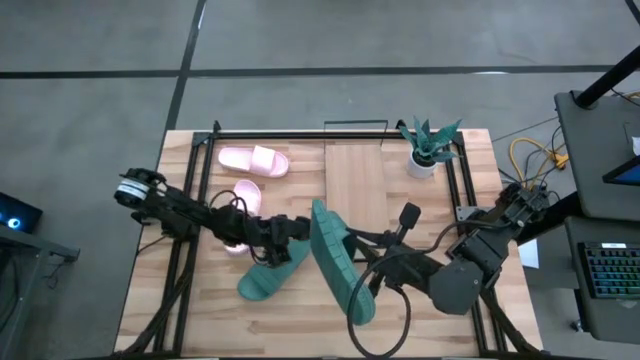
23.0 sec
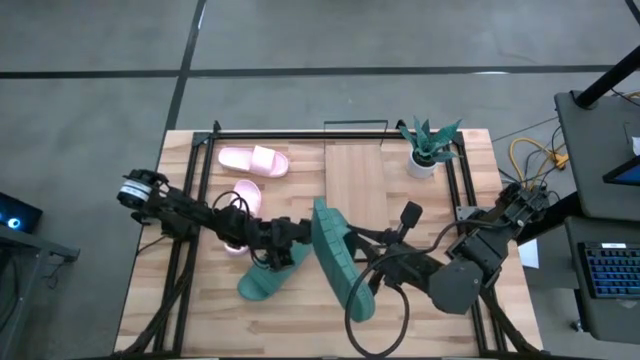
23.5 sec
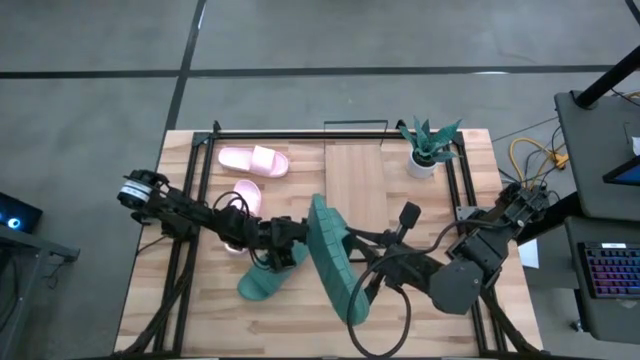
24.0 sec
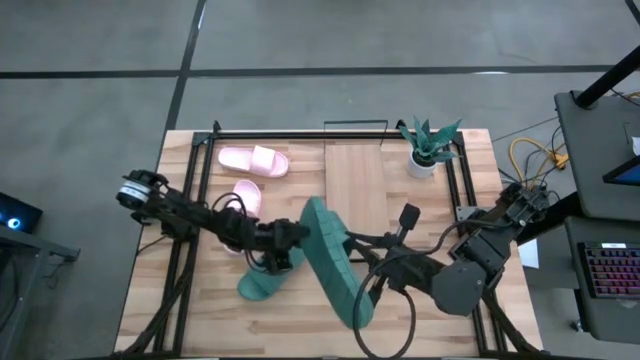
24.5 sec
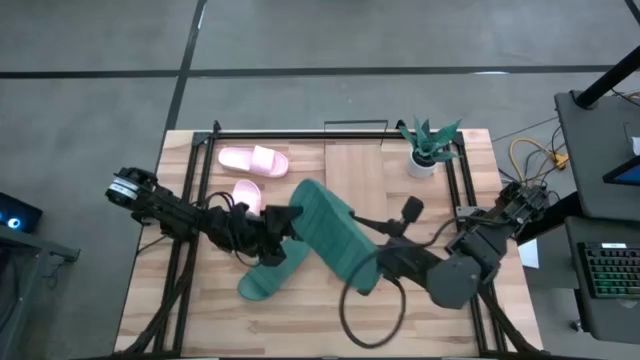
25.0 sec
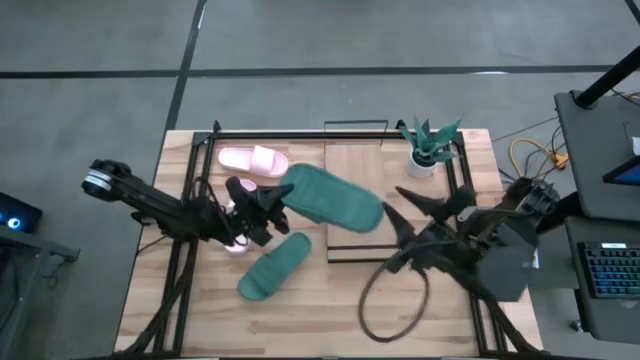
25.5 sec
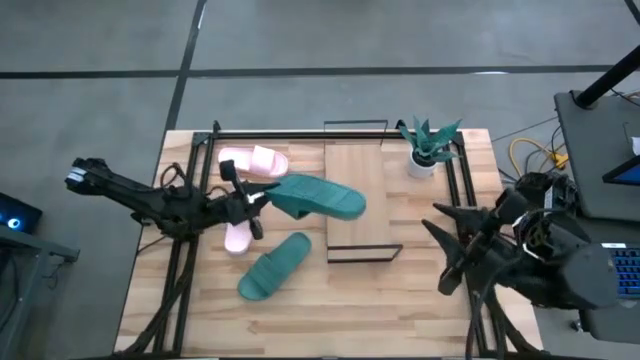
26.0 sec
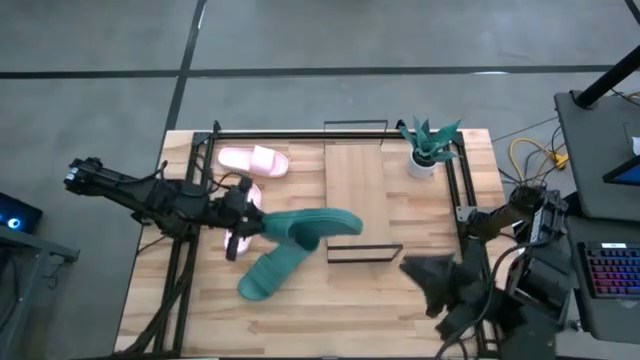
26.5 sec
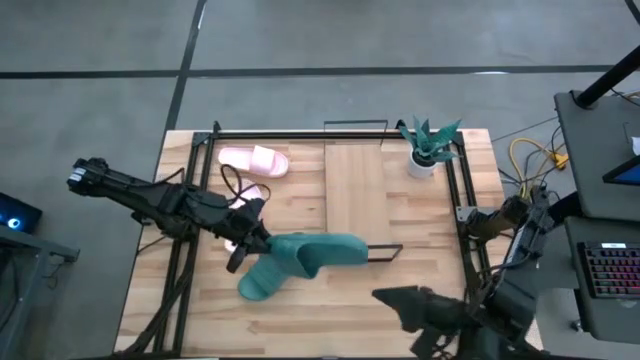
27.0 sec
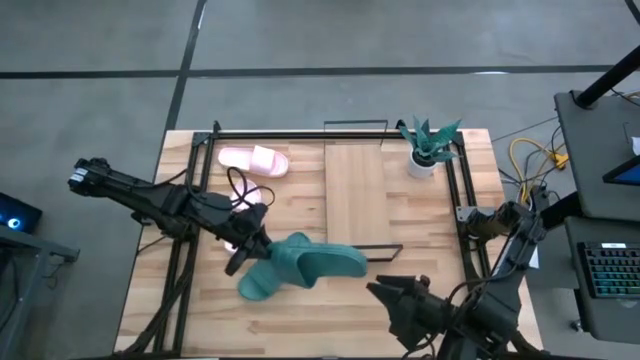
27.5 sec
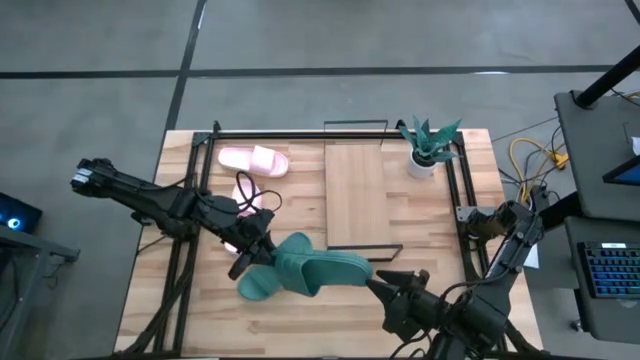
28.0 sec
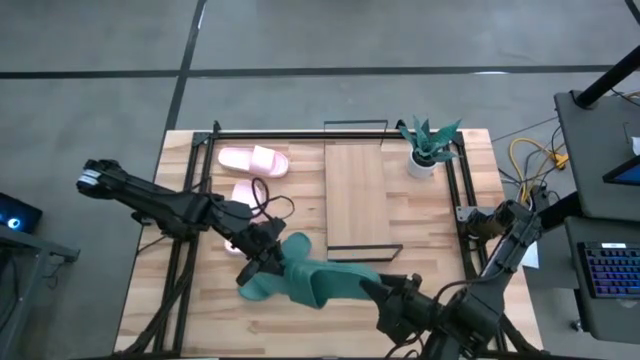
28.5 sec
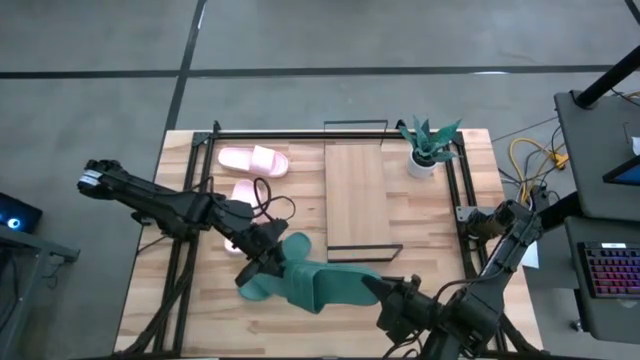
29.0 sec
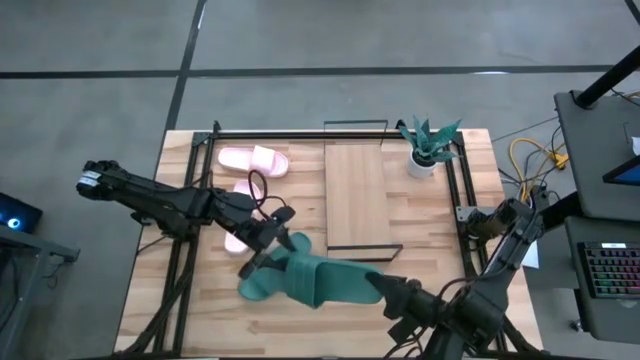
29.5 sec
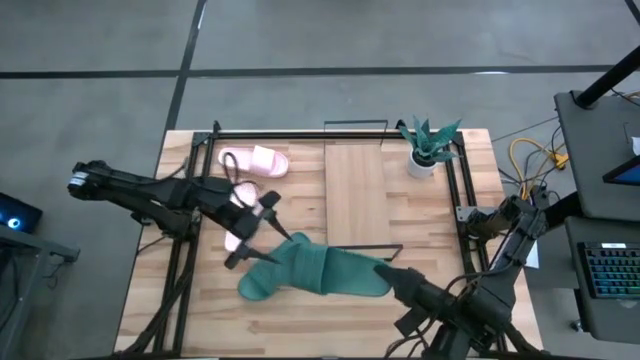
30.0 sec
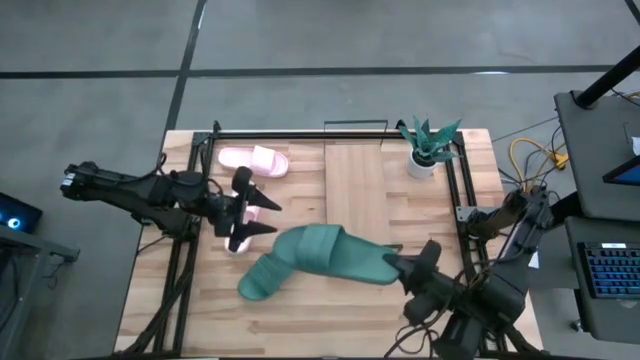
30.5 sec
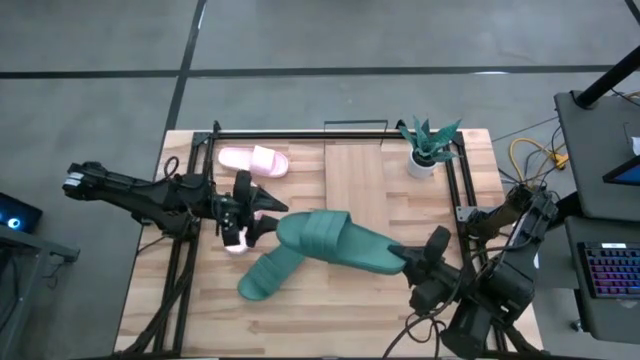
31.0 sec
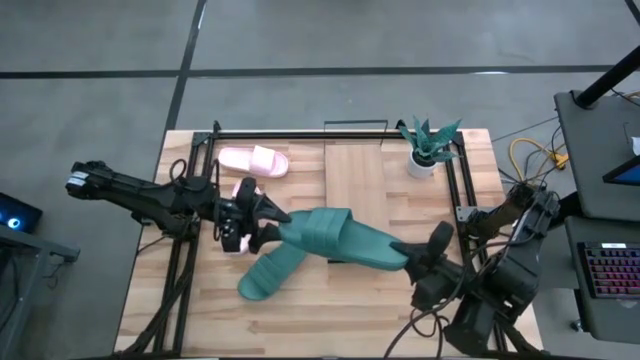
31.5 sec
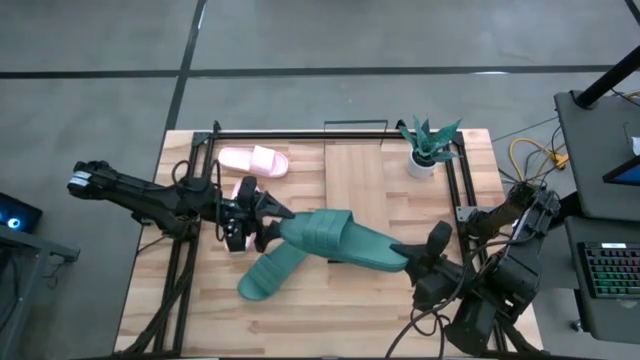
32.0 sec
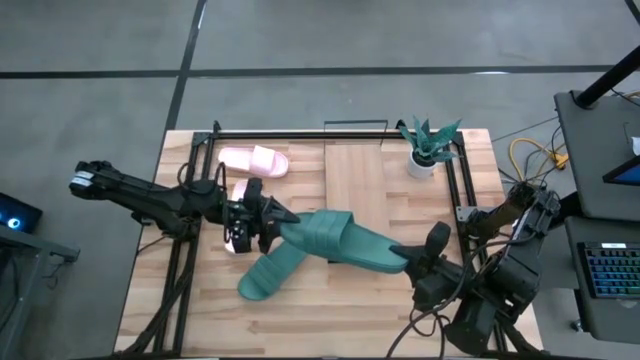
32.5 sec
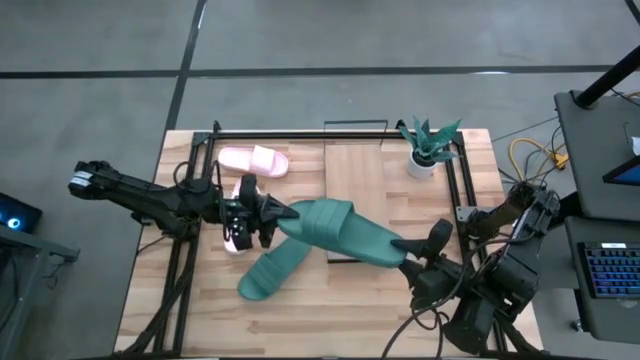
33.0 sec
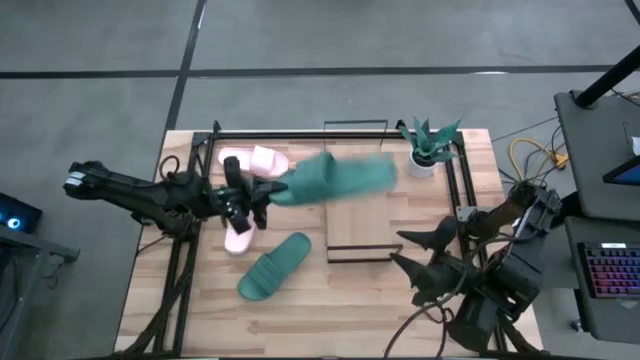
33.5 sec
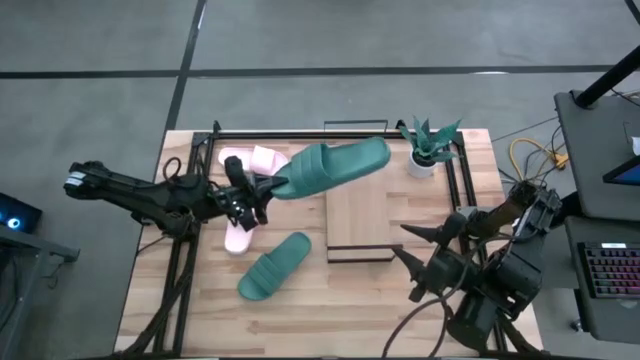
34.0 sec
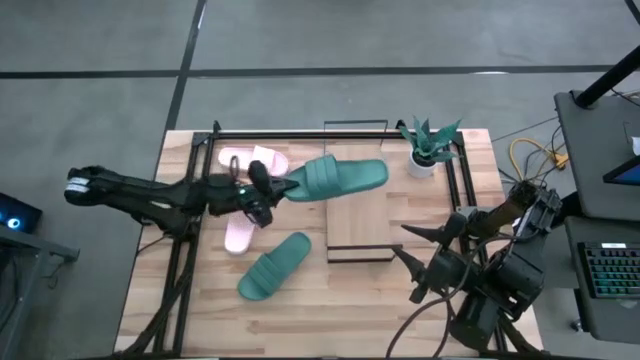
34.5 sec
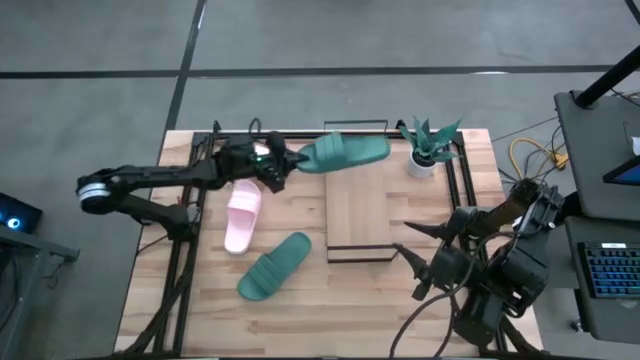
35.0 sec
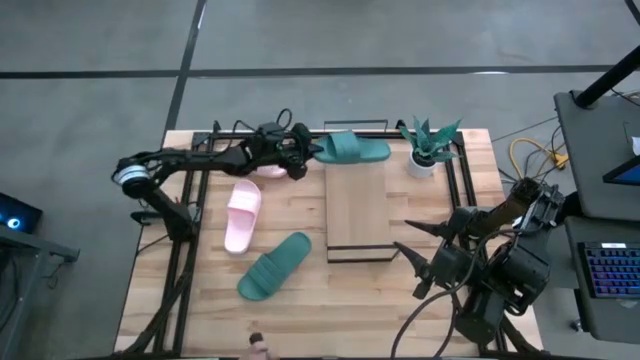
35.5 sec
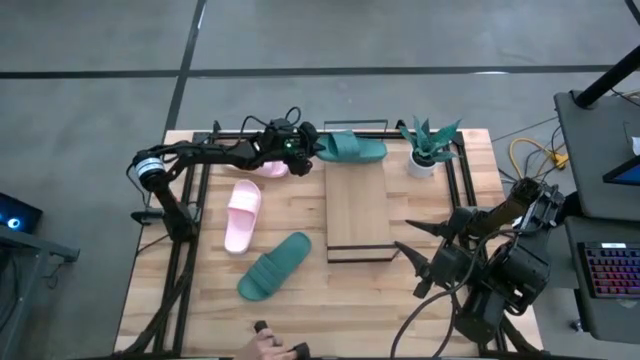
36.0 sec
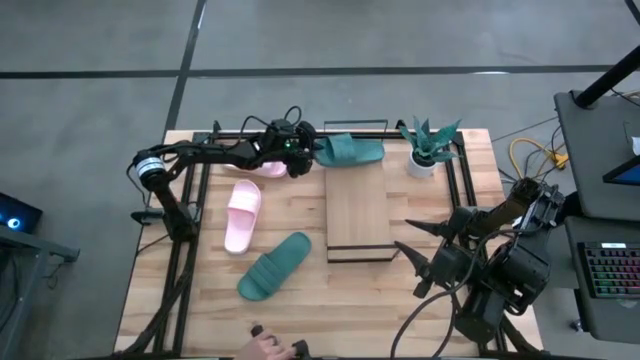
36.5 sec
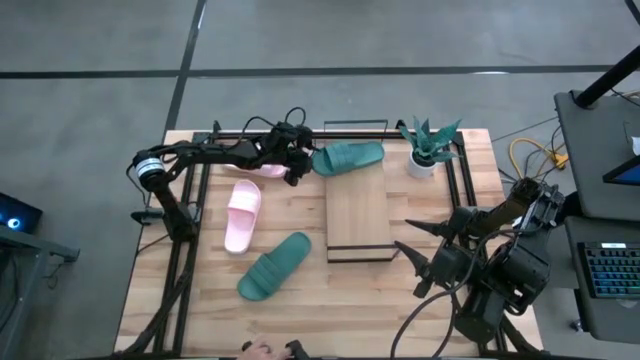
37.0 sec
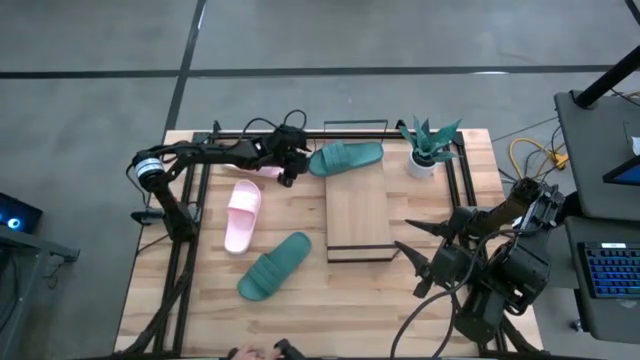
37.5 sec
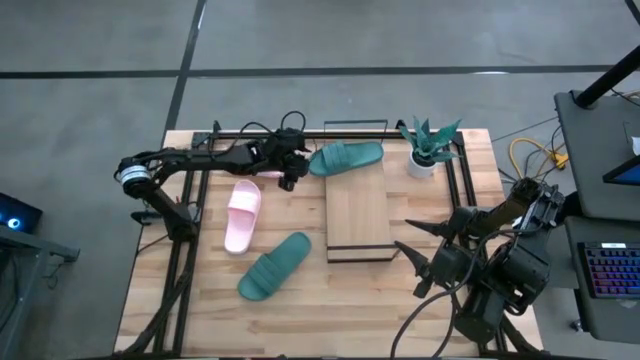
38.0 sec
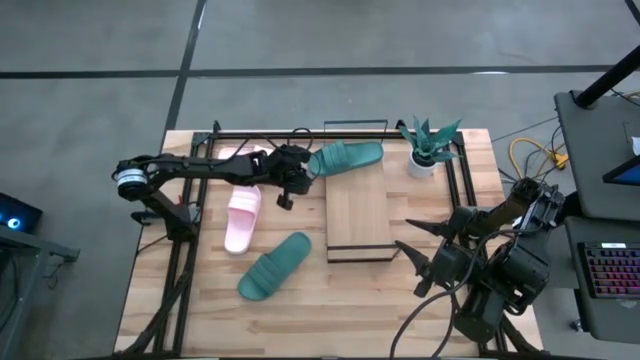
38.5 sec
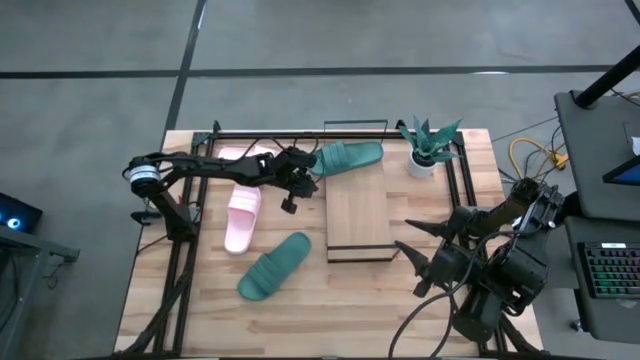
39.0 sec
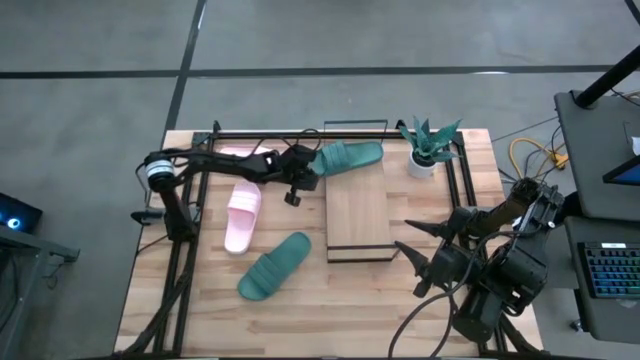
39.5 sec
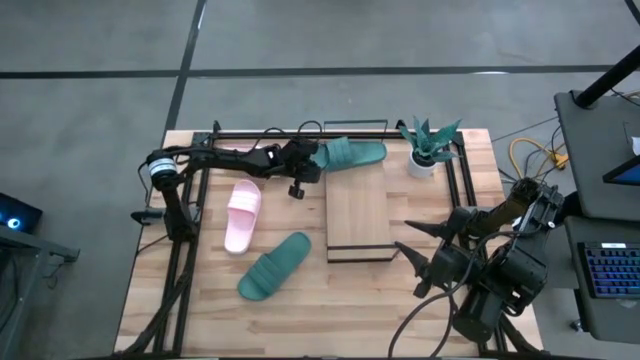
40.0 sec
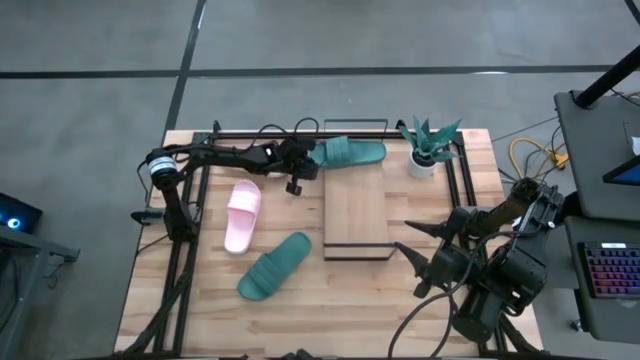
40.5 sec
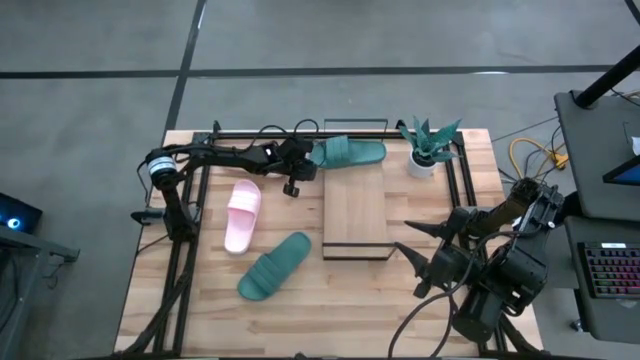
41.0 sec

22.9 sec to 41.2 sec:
Task: Pick and place slides into the shelf
Put the right green slipper on the shelf

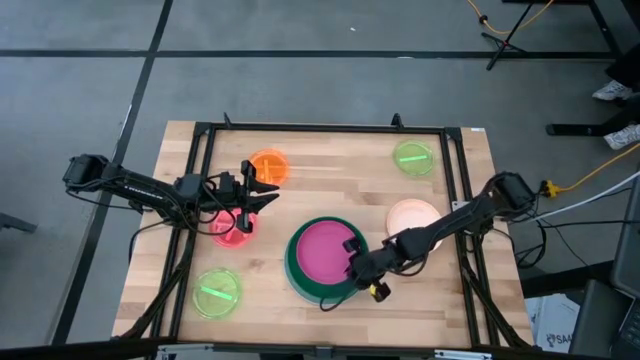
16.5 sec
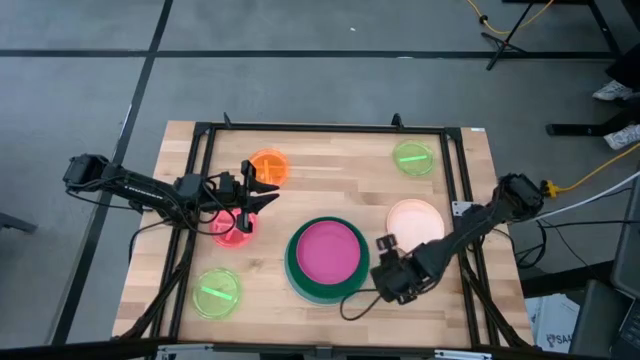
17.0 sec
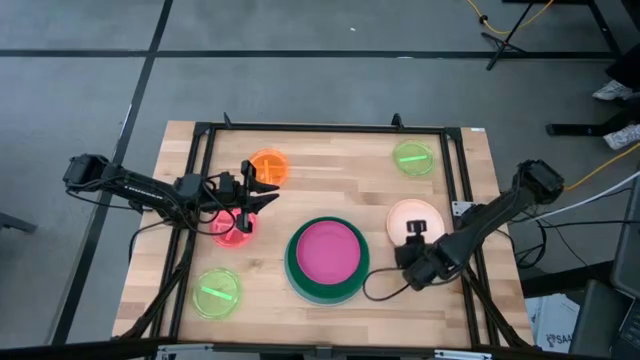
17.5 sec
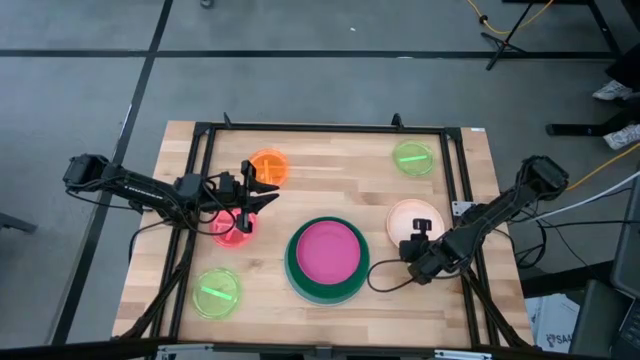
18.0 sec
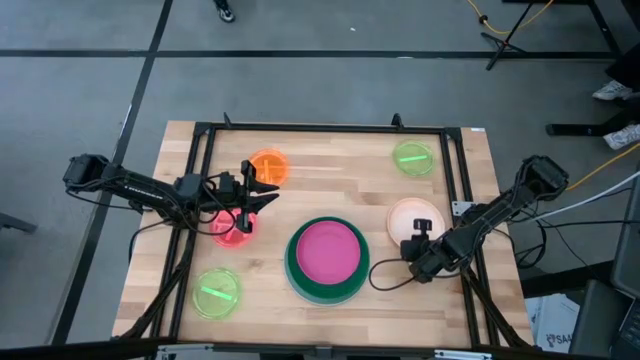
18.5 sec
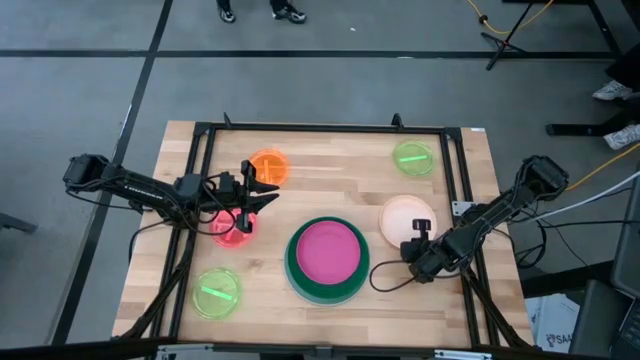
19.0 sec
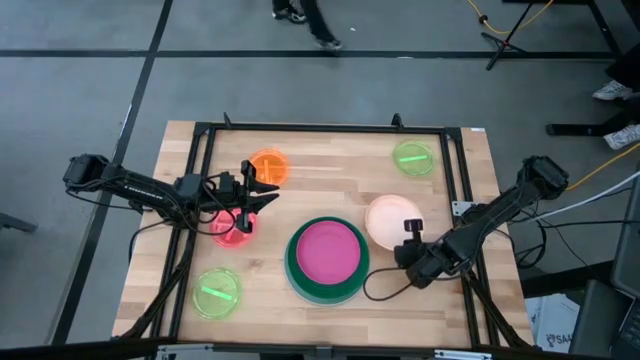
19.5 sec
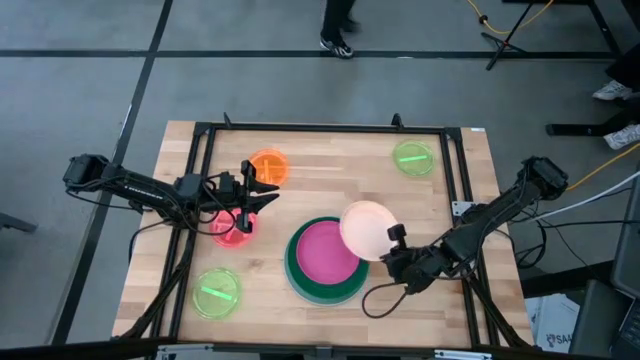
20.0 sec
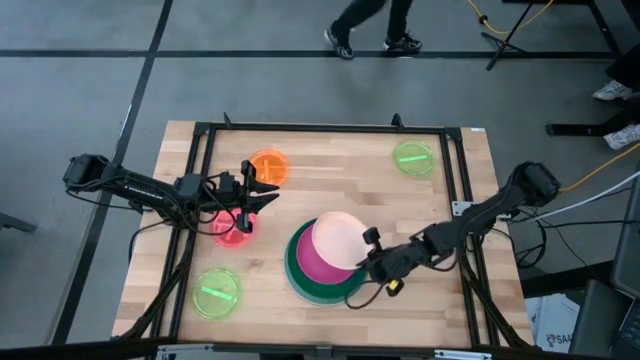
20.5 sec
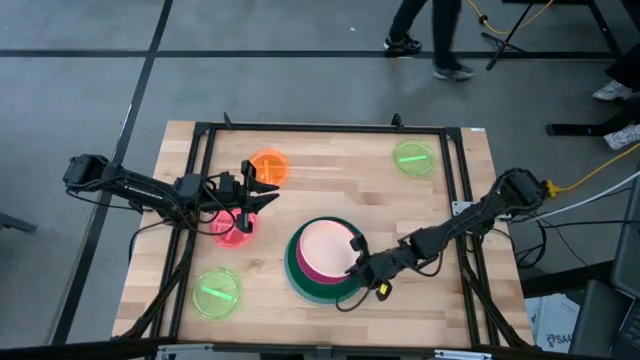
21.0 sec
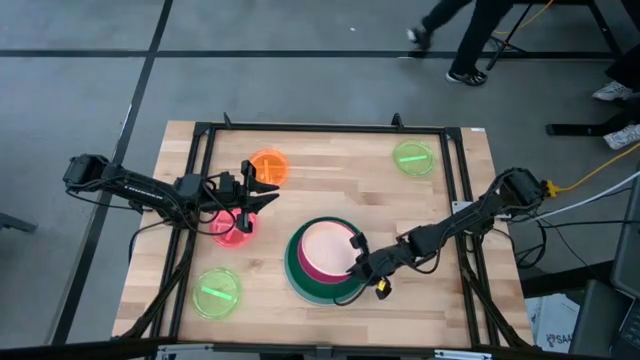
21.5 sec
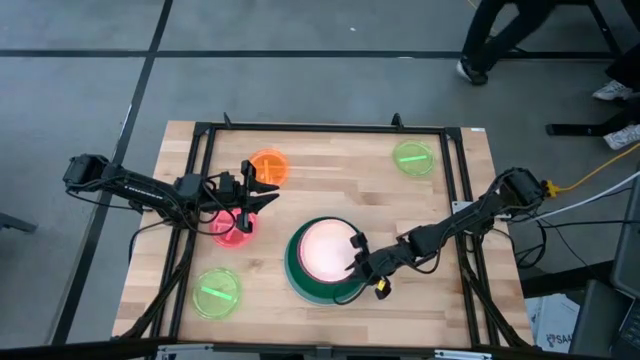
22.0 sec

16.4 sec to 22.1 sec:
Task: Stack plastic plates
Stack the light orange plate on top of the pink plate
